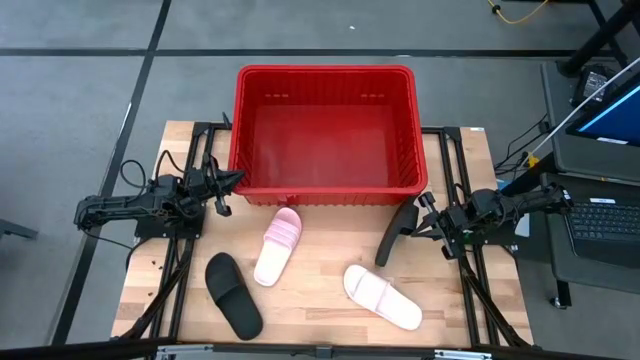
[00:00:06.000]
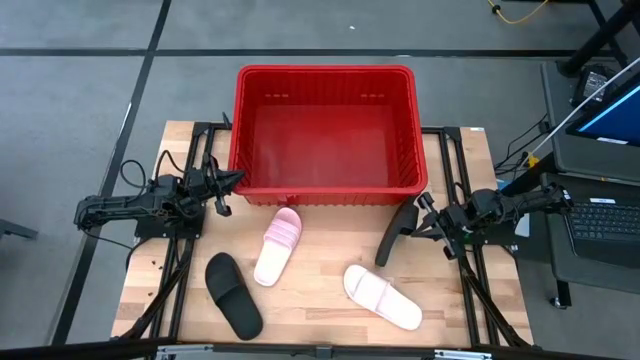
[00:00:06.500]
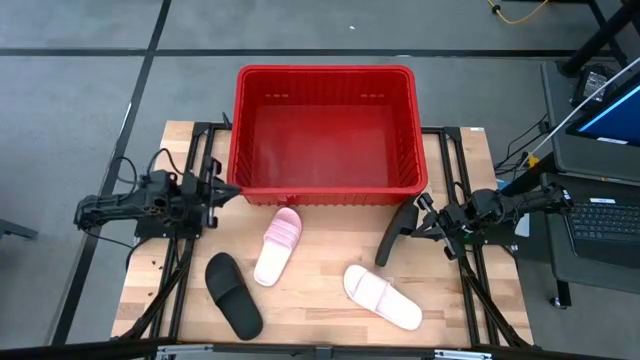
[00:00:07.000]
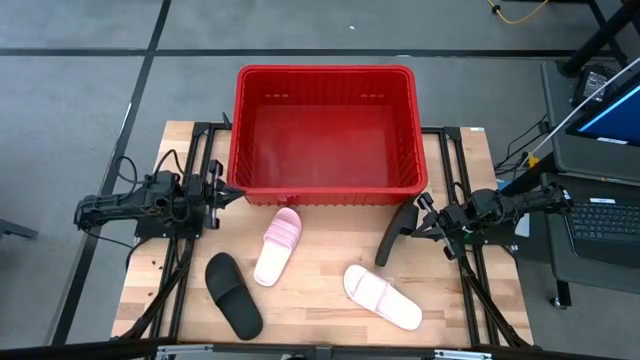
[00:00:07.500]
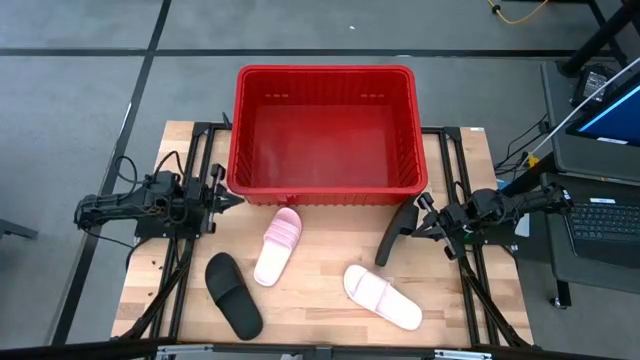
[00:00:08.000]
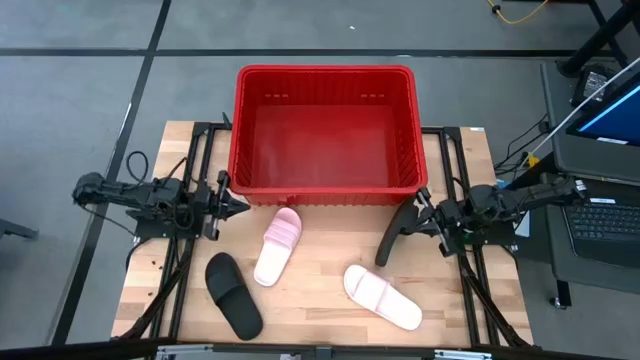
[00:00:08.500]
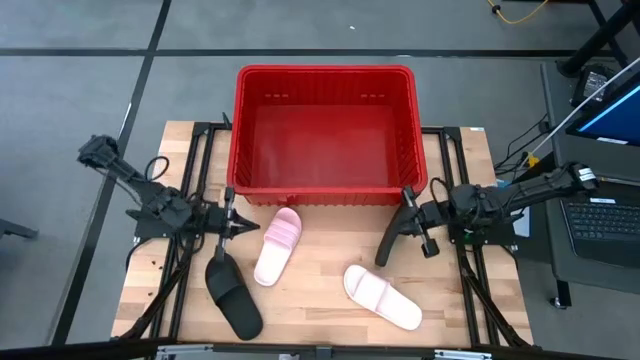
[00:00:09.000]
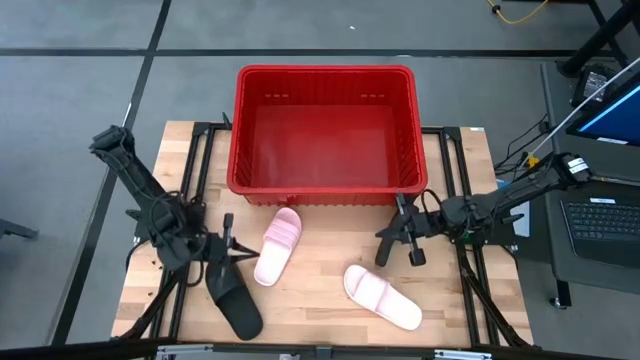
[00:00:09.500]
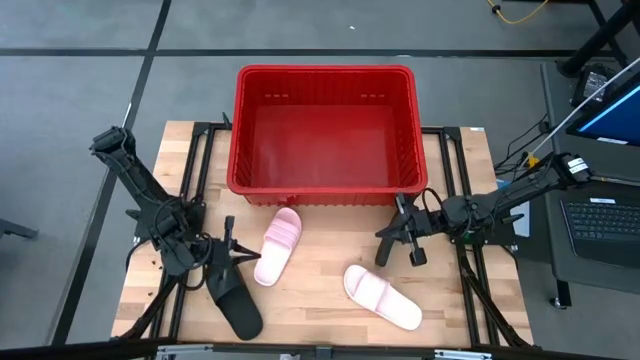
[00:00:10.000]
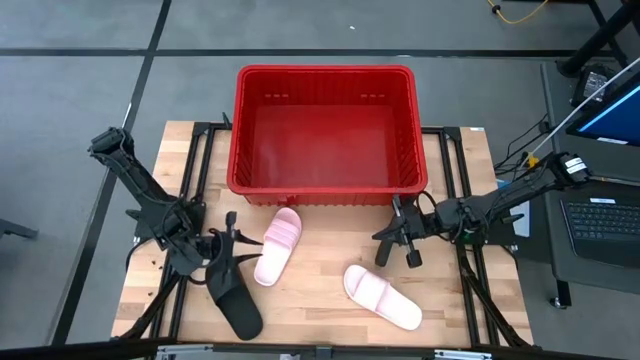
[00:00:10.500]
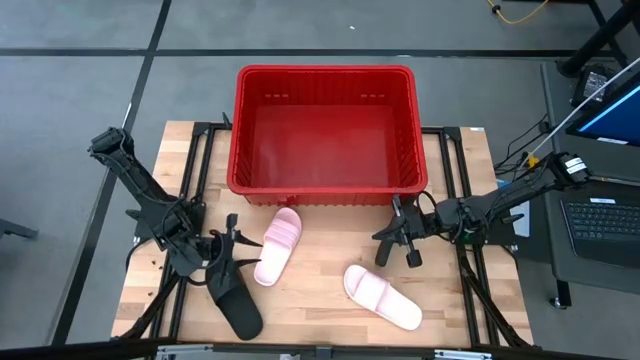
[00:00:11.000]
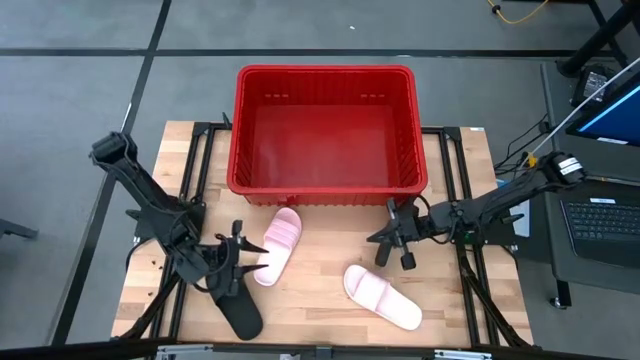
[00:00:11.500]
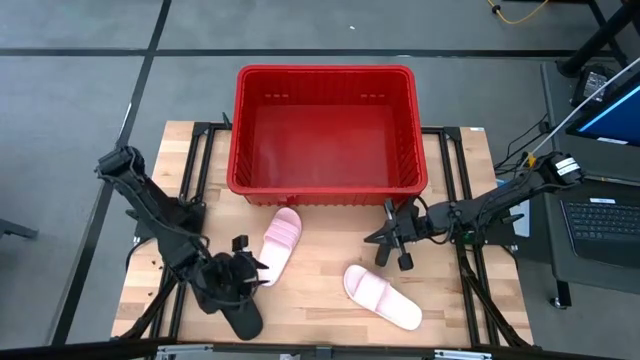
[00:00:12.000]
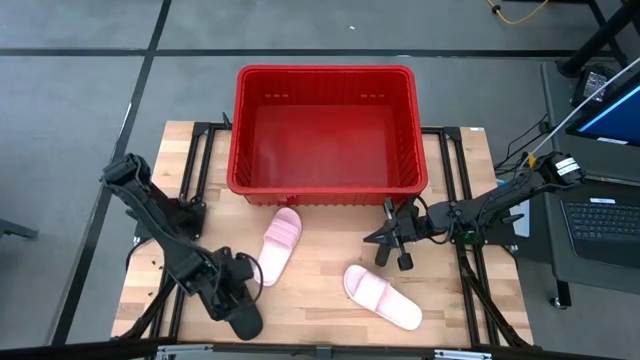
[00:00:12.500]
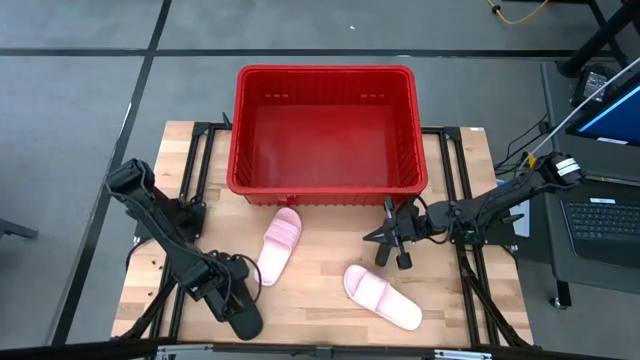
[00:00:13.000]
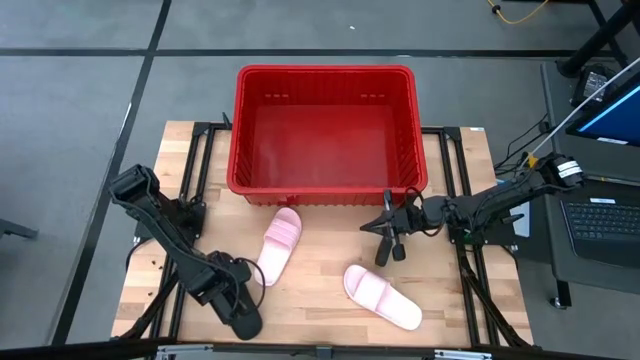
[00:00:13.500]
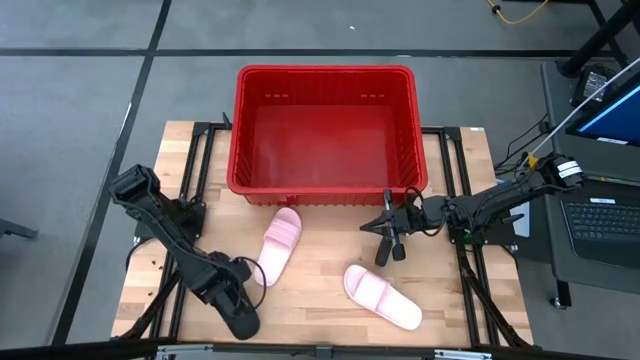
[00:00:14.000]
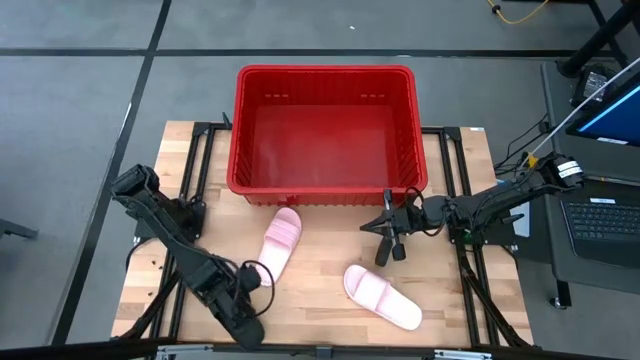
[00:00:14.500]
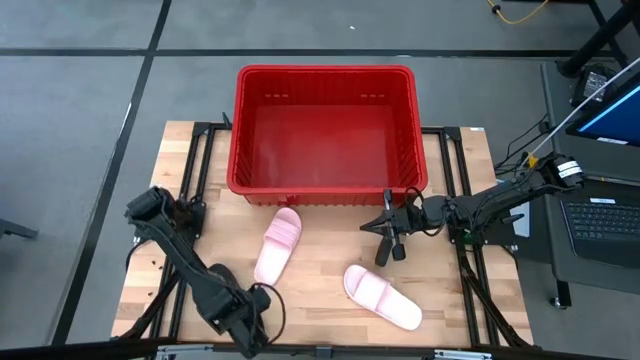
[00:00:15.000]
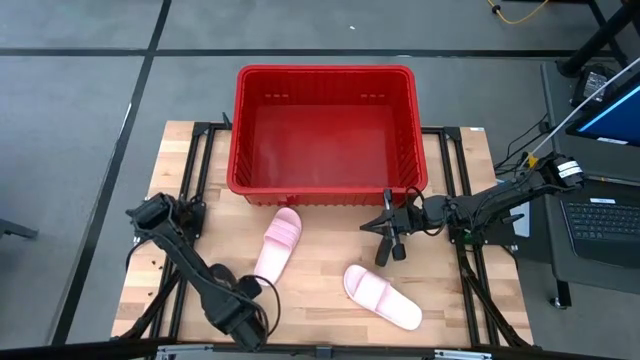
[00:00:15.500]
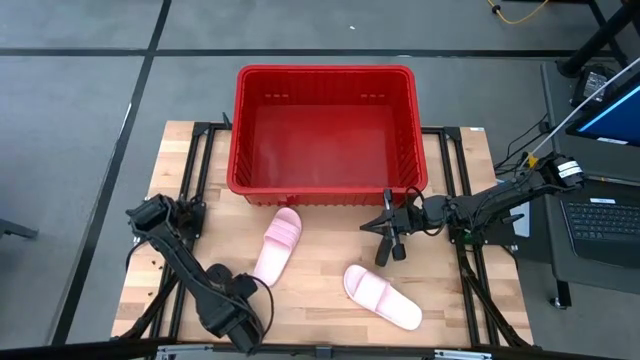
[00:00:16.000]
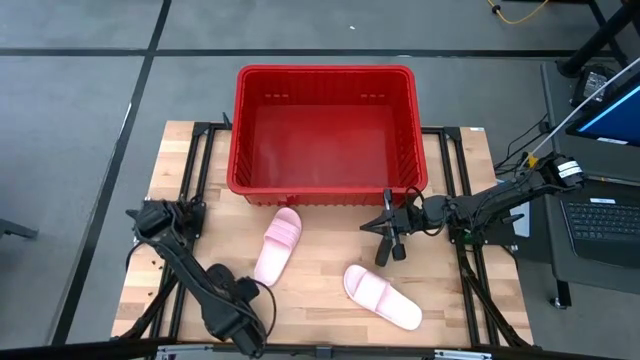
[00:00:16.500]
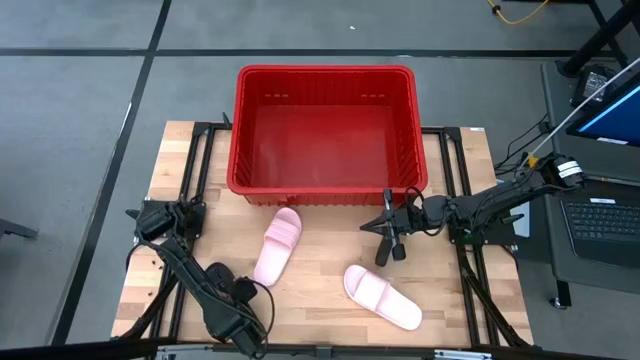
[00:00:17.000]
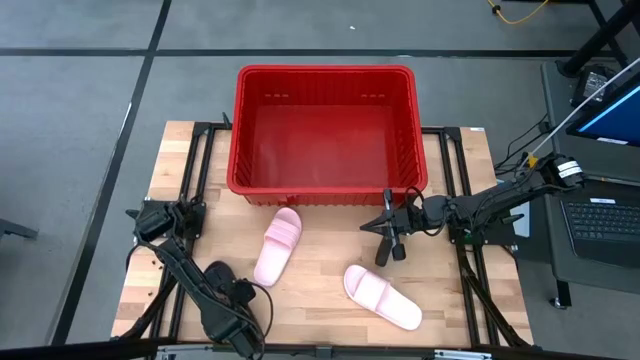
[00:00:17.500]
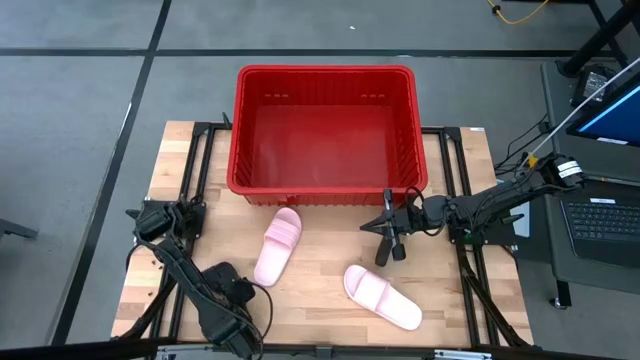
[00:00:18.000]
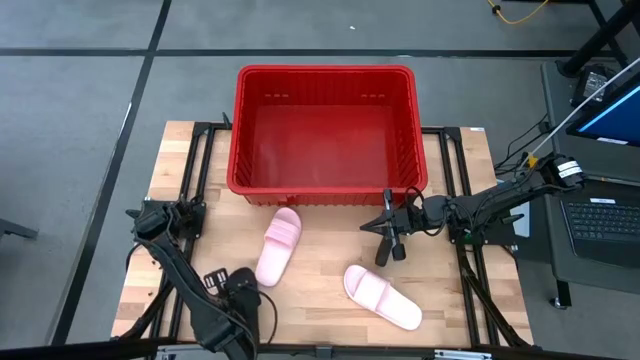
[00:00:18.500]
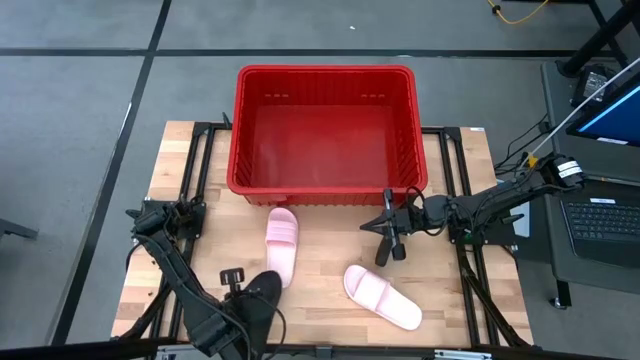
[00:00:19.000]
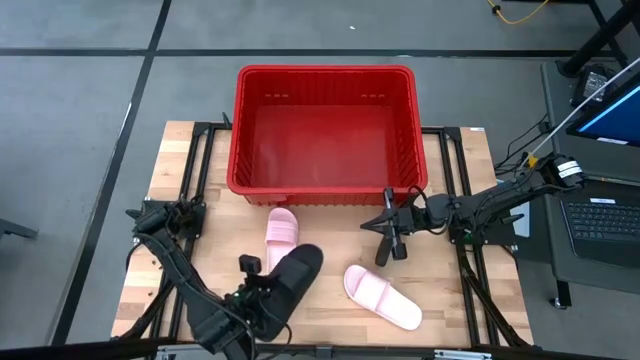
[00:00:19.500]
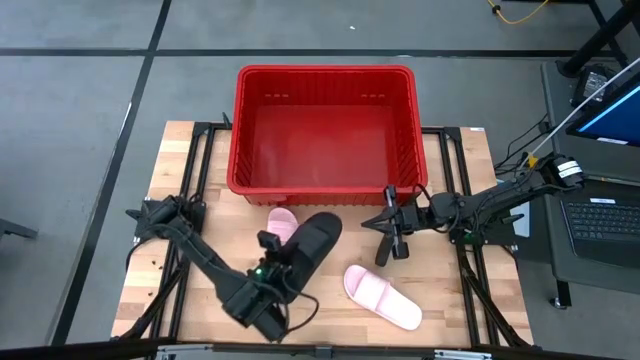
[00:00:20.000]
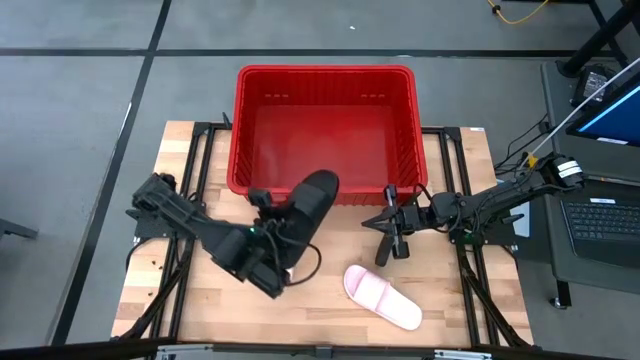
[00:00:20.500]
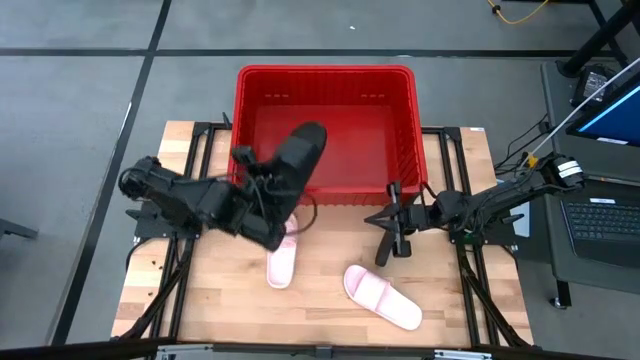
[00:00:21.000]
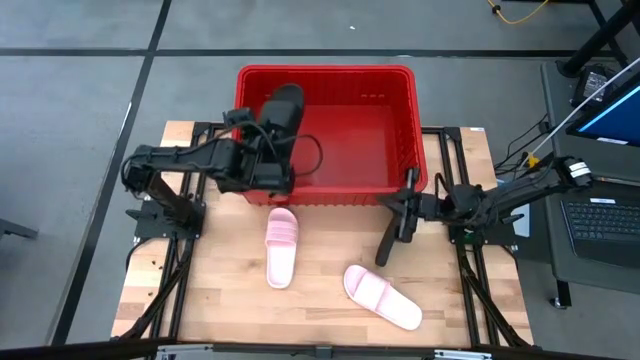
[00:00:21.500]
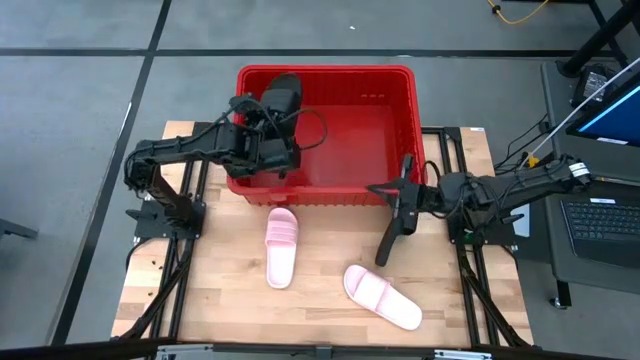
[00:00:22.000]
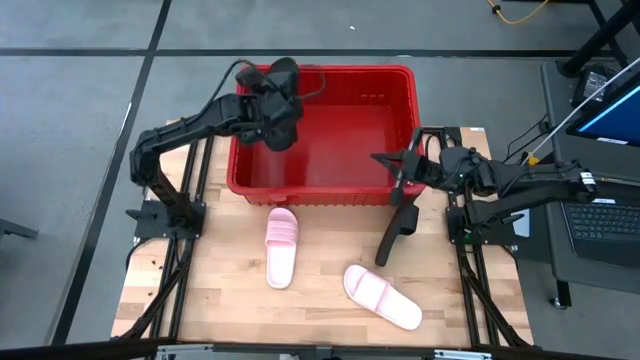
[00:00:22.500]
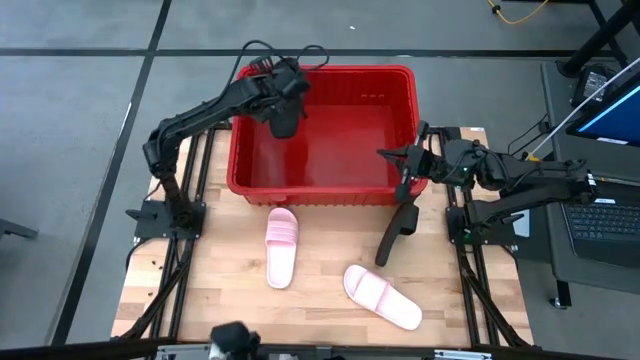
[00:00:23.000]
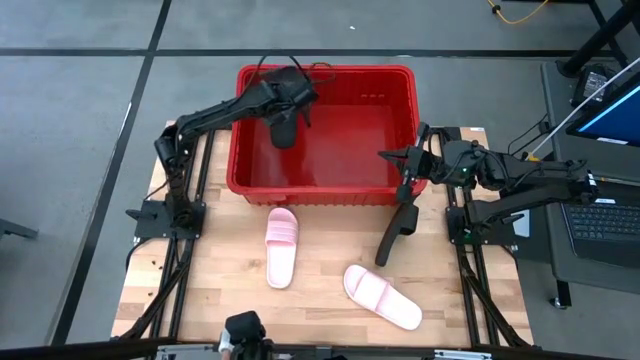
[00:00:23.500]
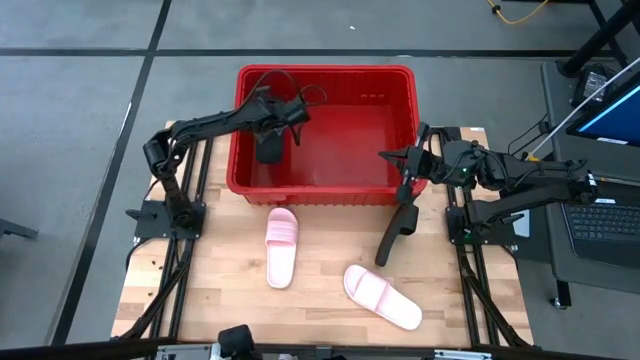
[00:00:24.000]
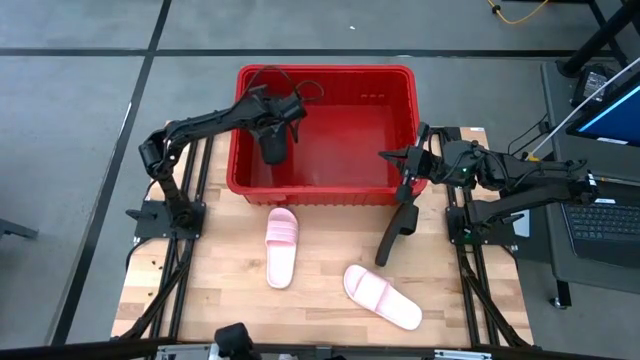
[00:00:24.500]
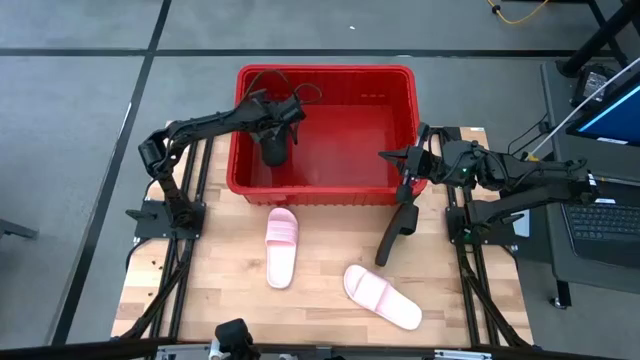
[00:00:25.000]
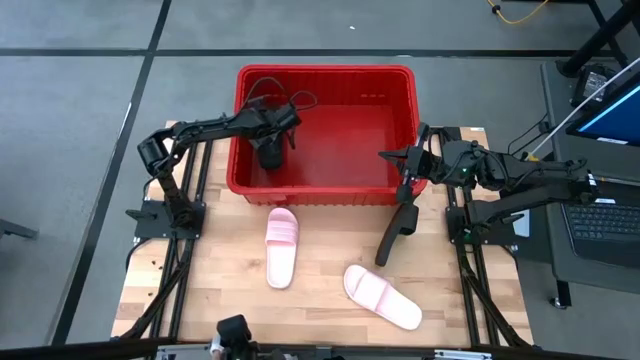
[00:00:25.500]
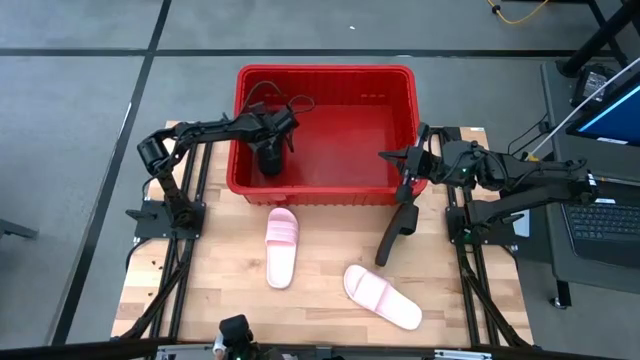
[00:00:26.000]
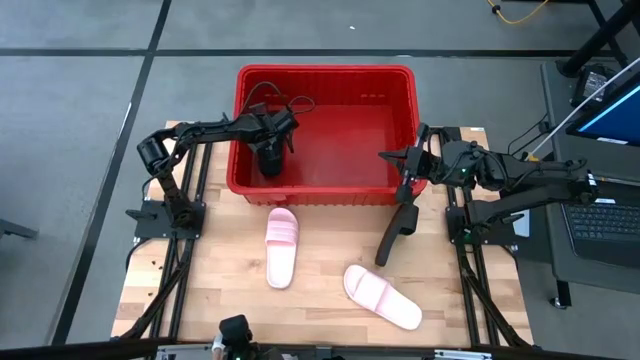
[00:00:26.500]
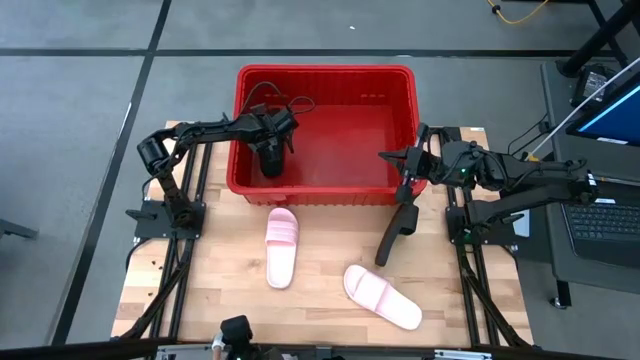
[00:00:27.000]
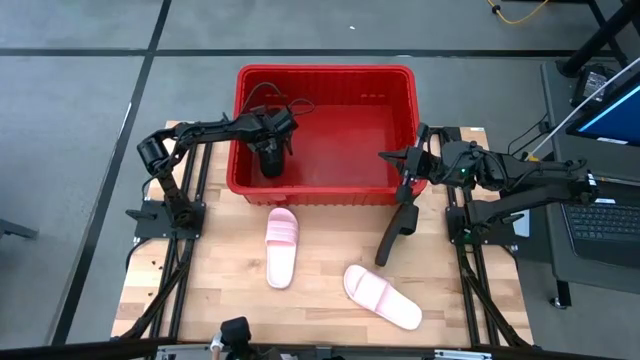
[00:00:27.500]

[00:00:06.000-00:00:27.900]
Task: Pick and place slides into bin
Put the bottom black slipper into the red bin
